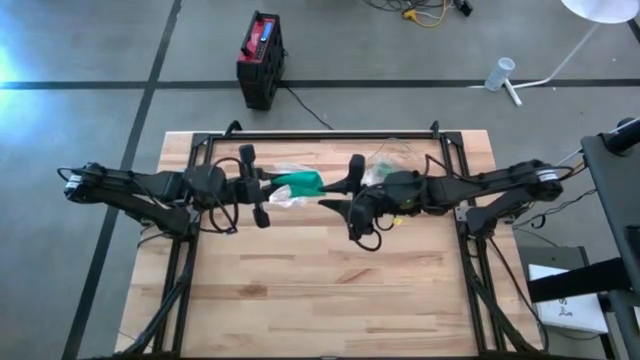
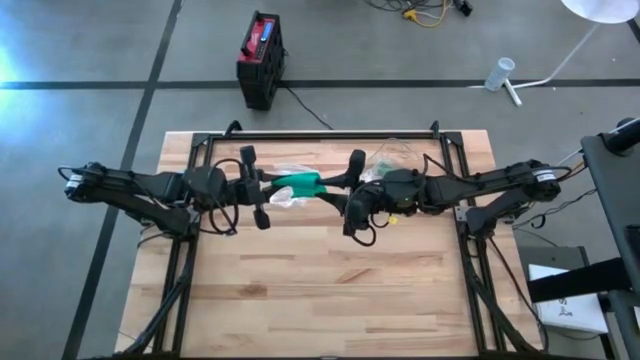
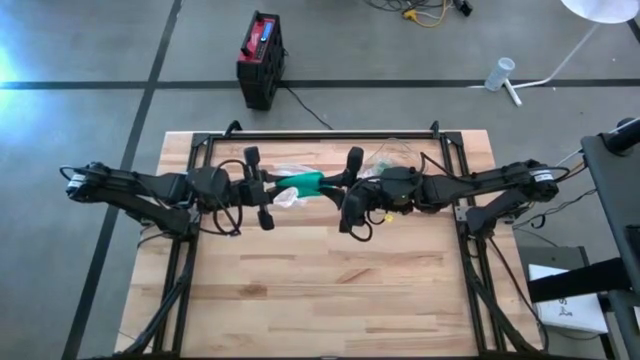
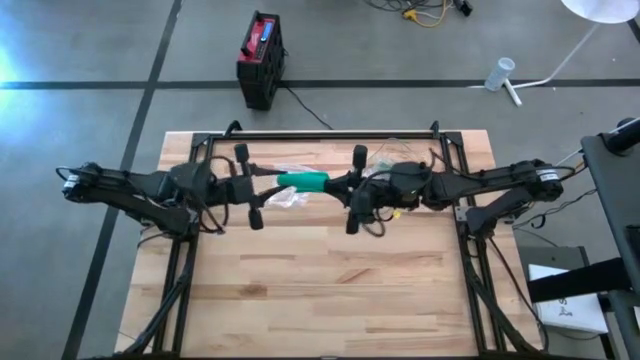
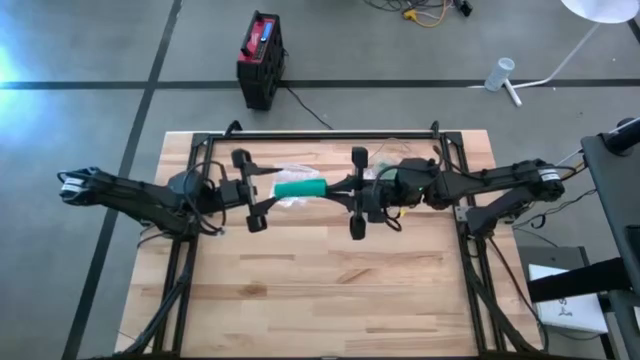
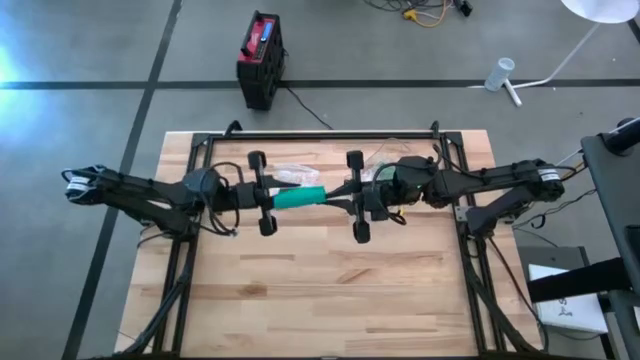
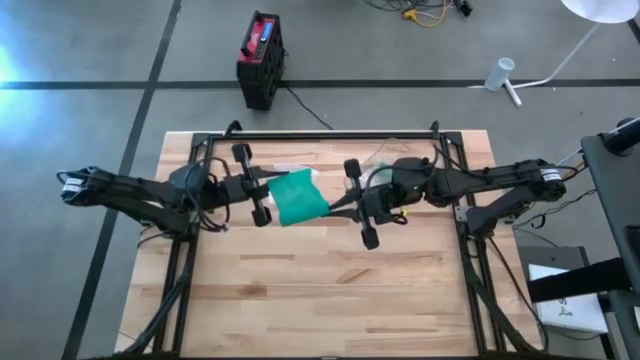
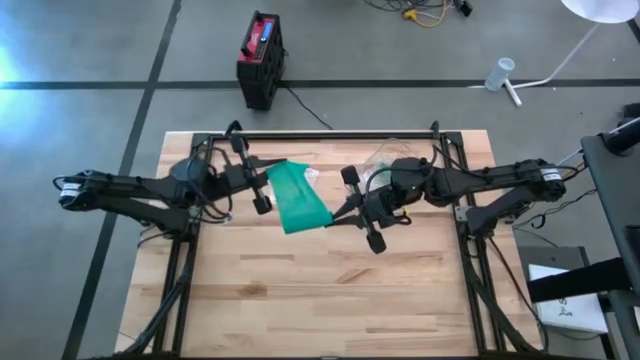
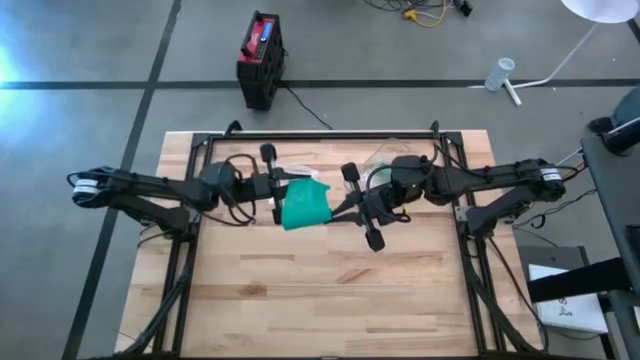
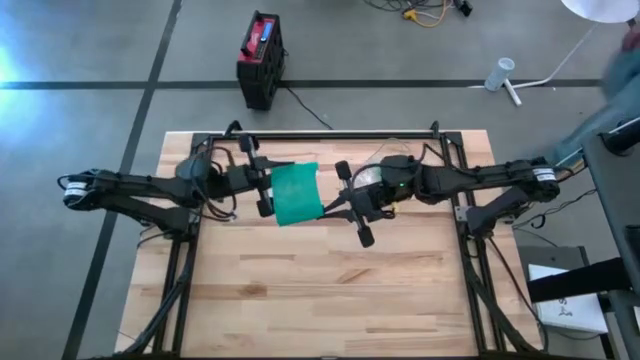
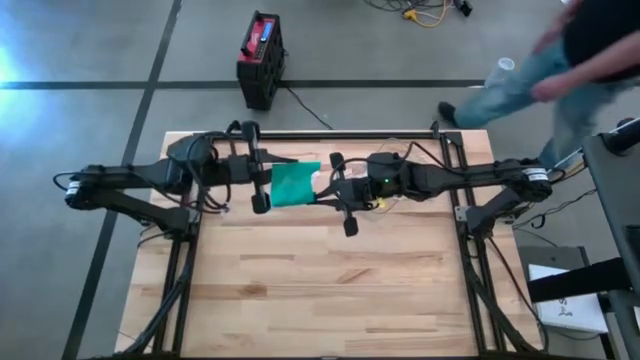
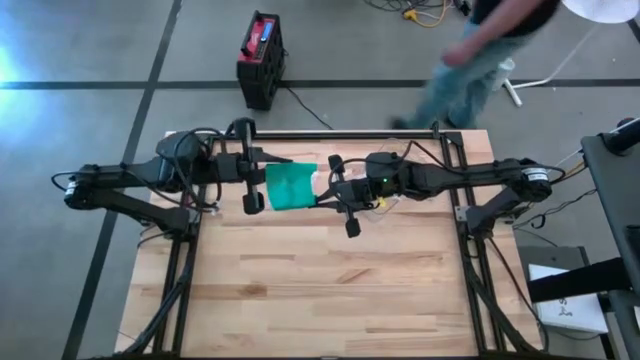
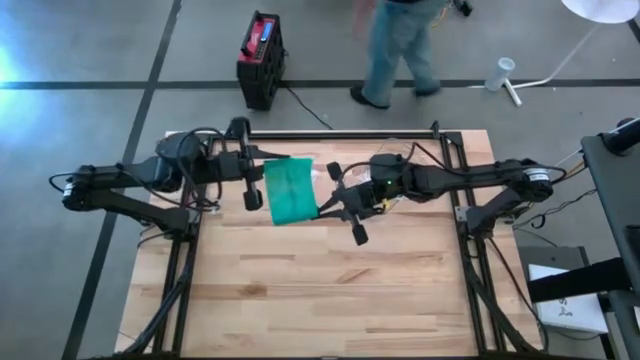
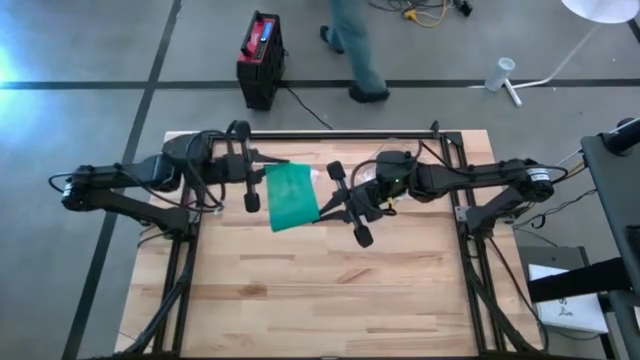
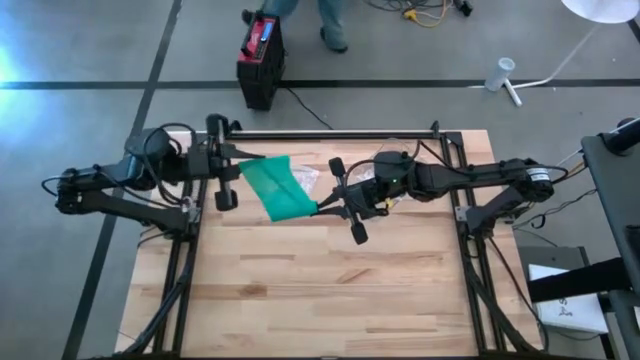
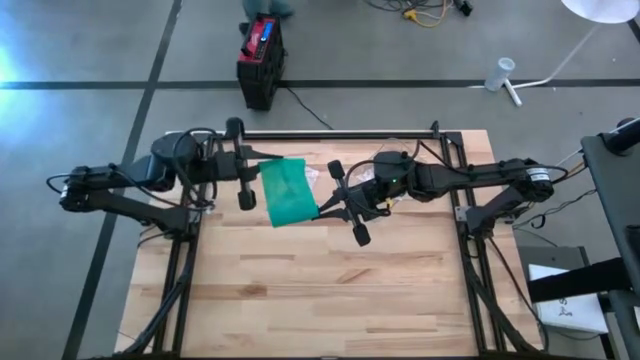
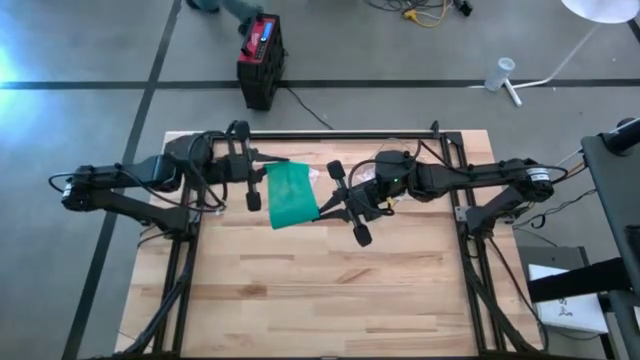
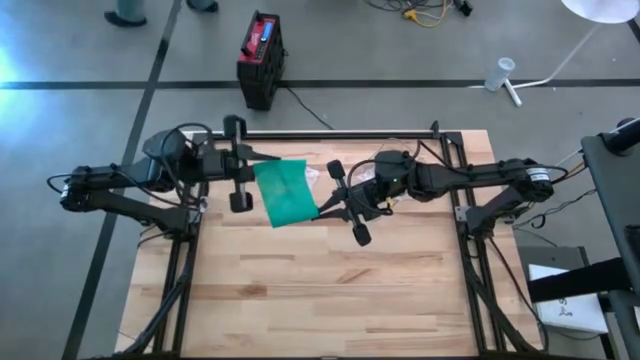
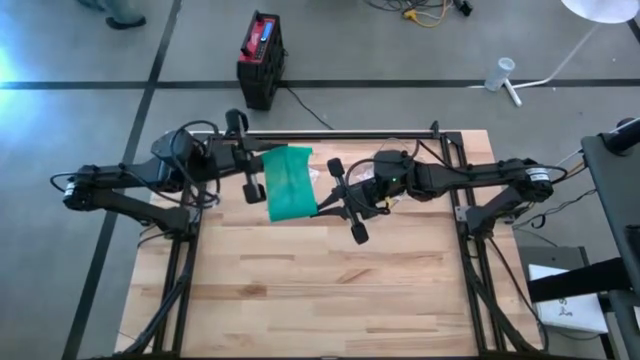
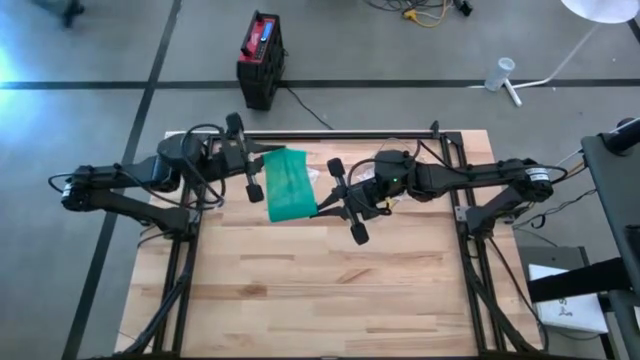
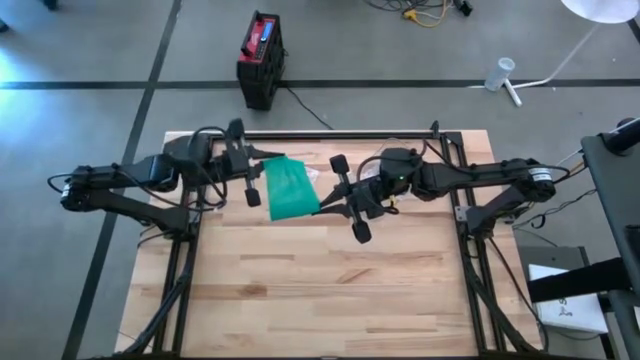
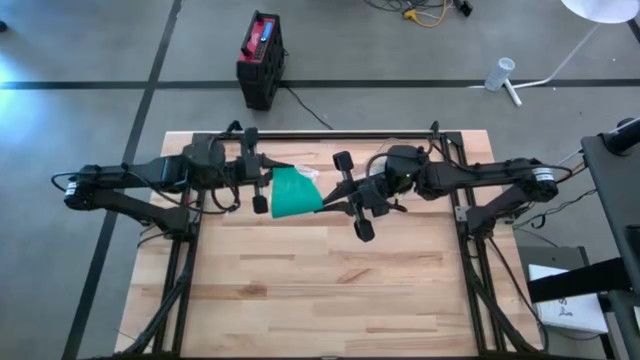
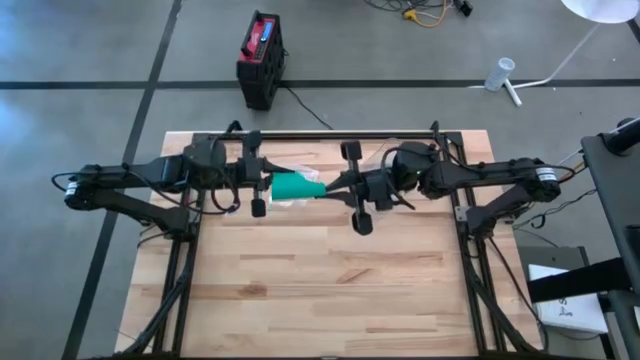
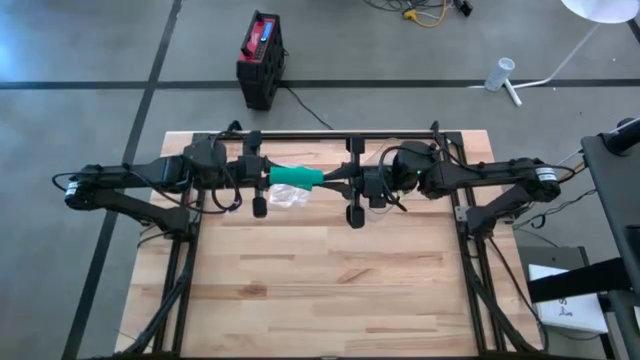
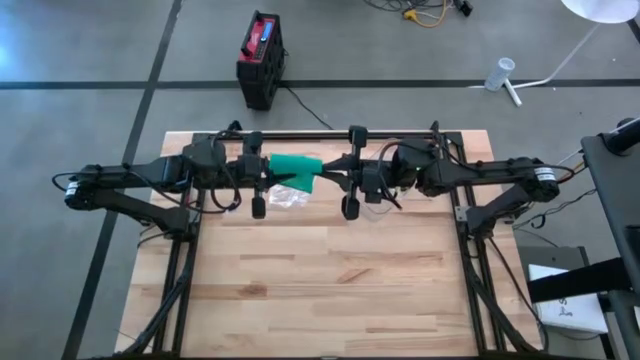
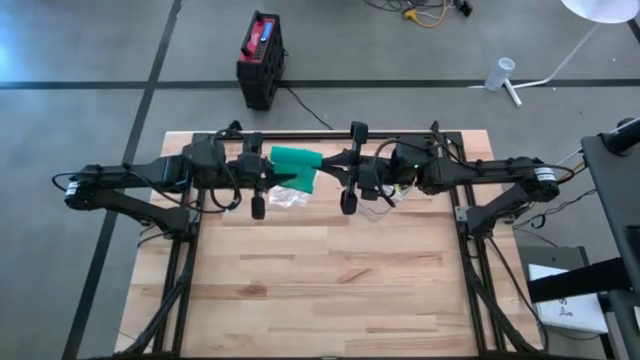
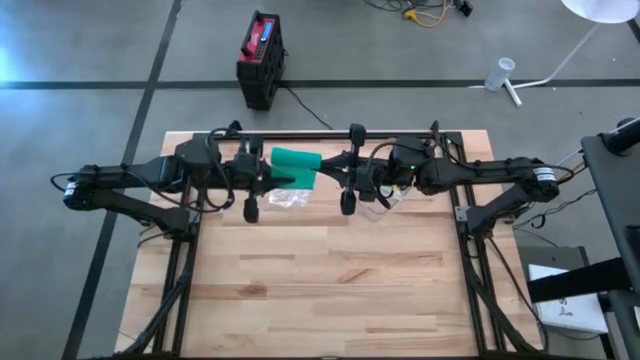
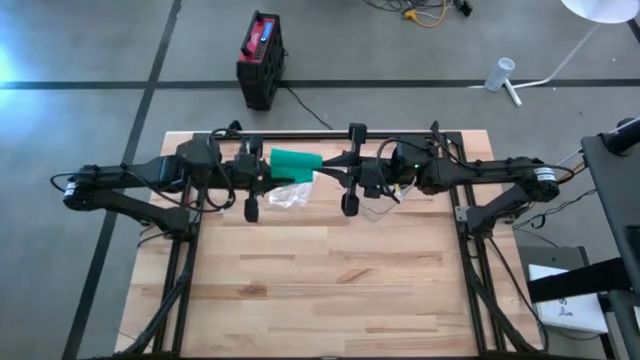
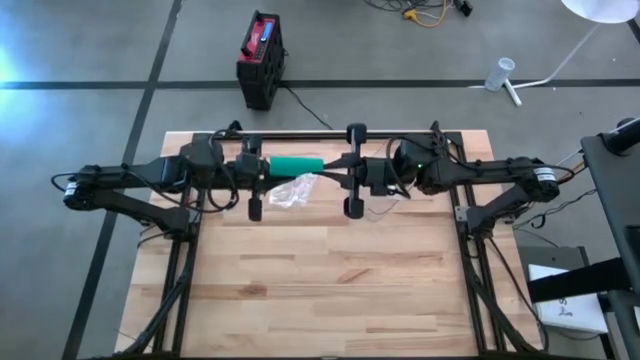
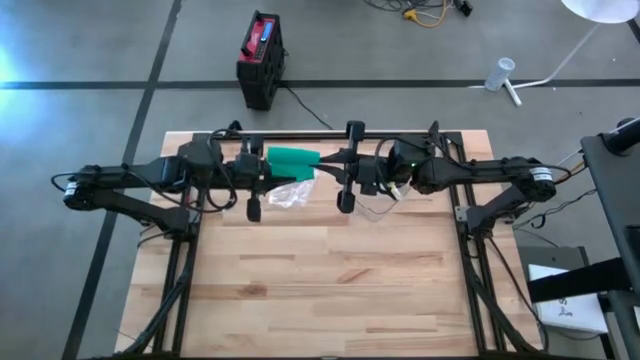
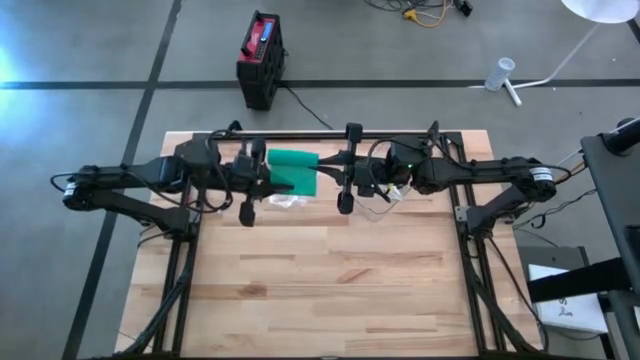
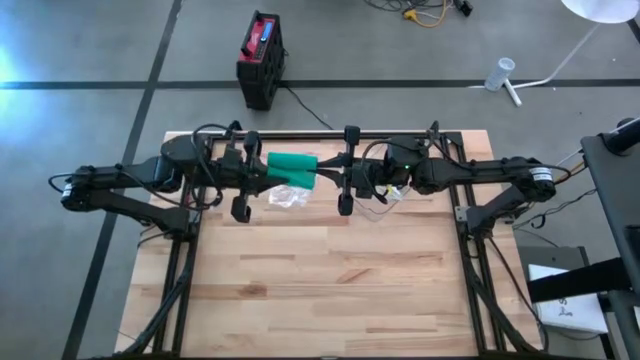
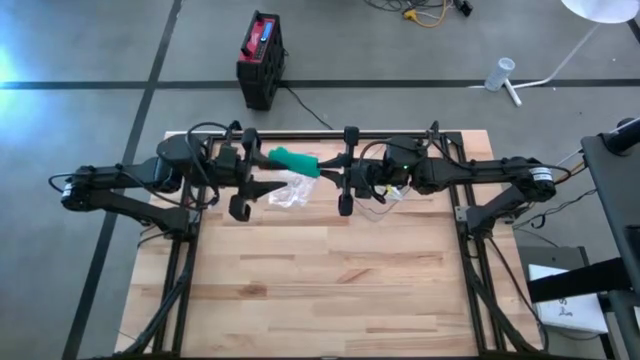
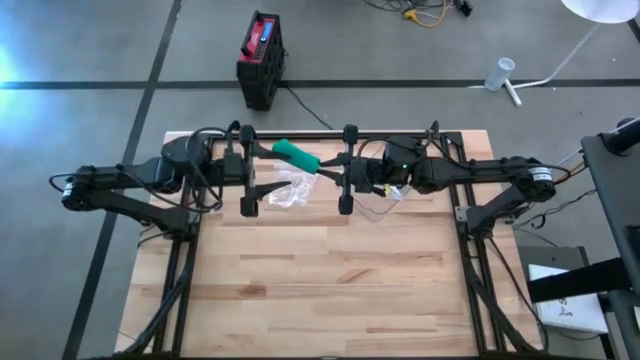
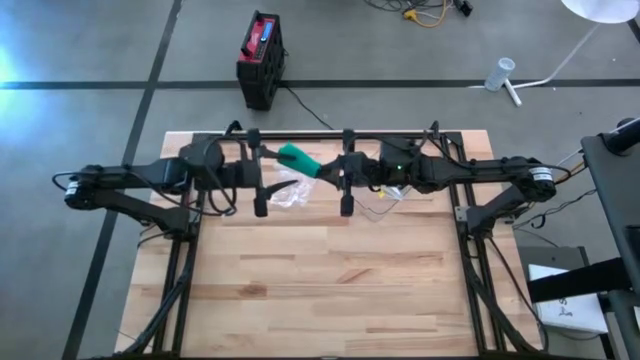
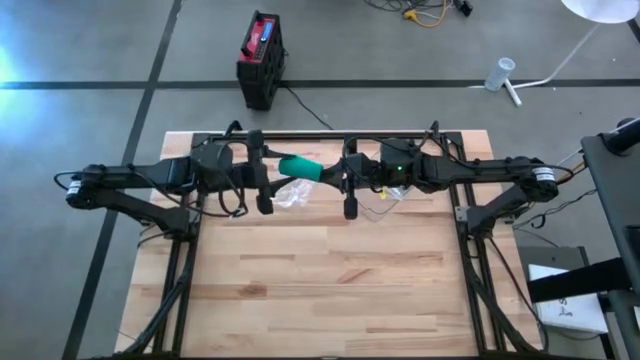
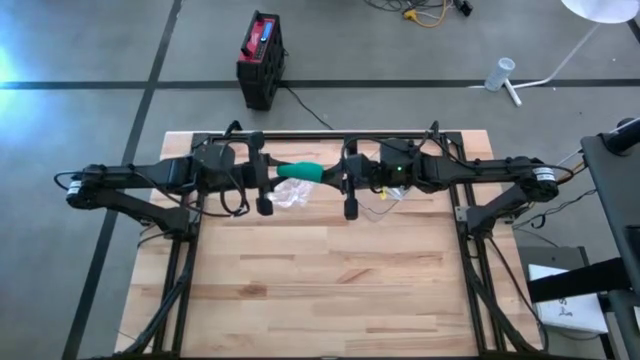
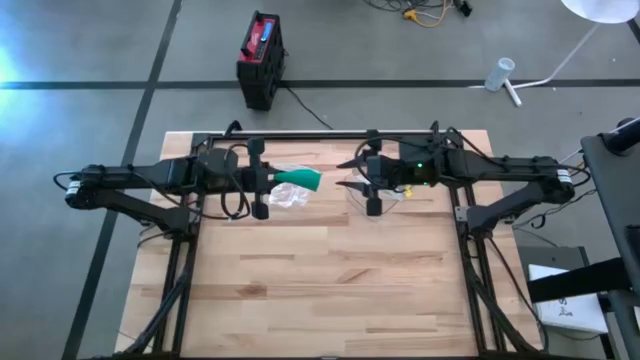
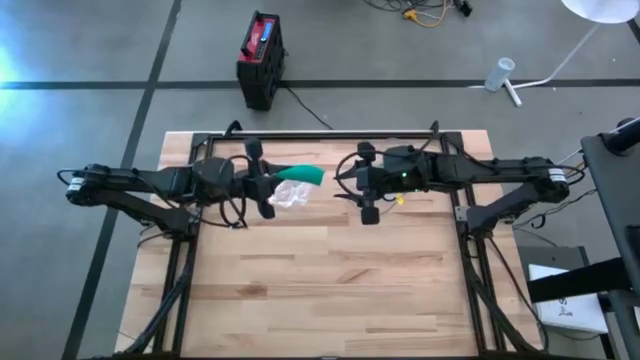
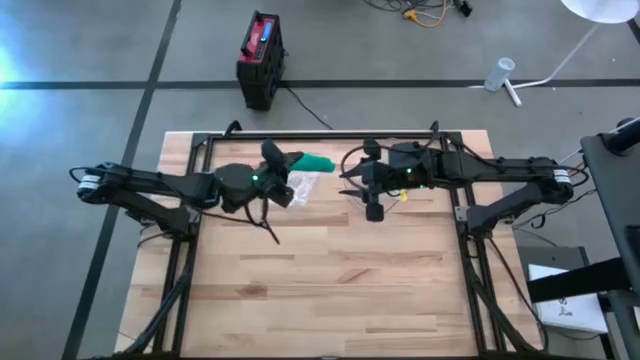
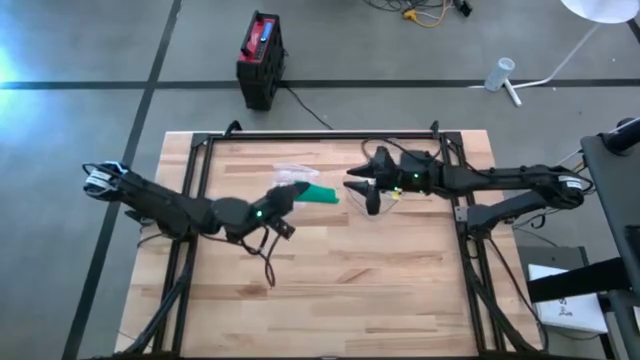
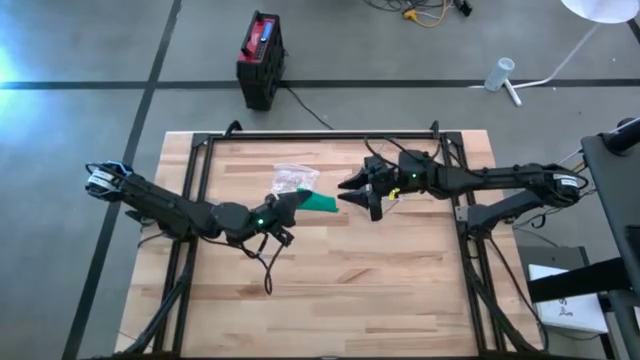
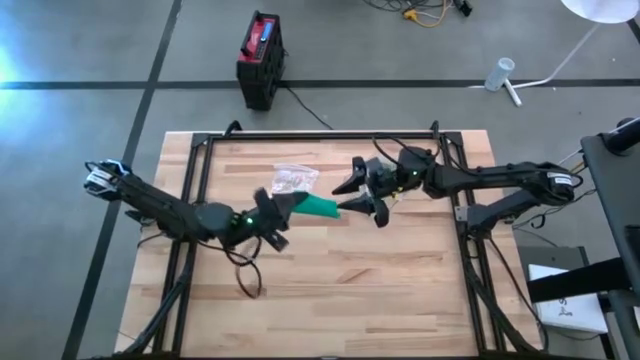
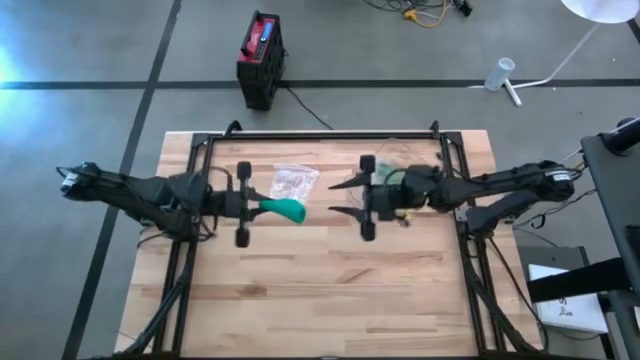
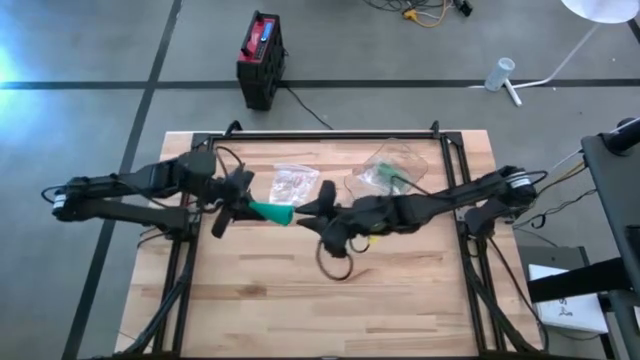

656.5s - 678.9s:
Task: Roll bandage
Roll the dark green bandage
